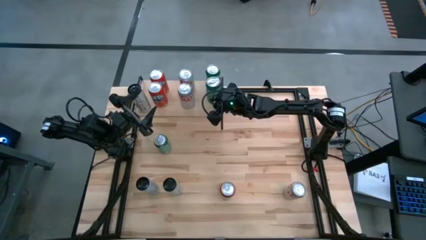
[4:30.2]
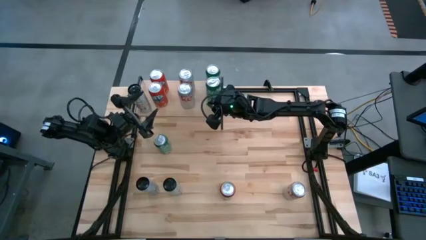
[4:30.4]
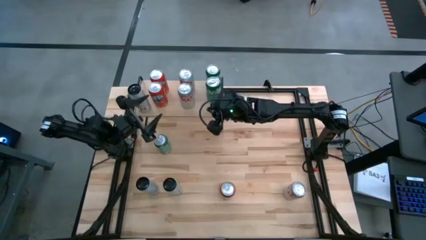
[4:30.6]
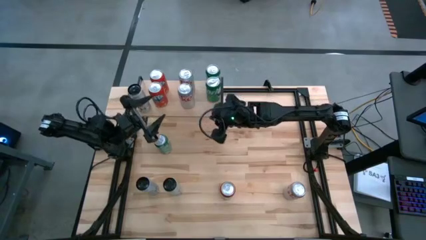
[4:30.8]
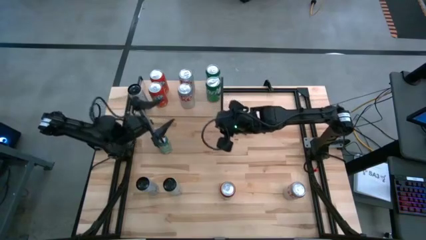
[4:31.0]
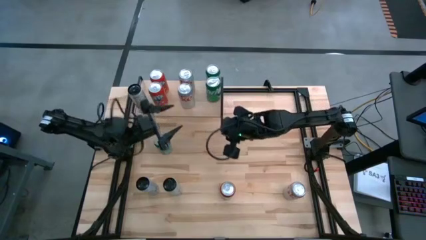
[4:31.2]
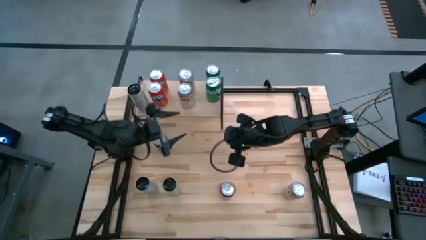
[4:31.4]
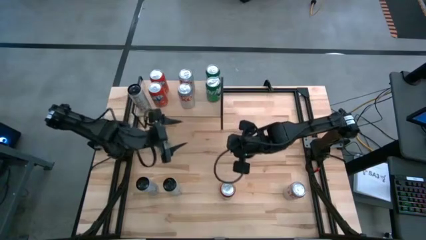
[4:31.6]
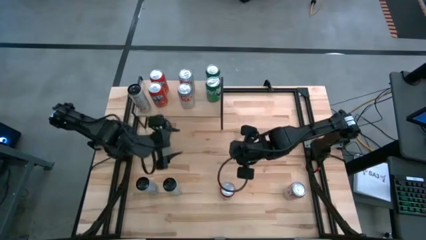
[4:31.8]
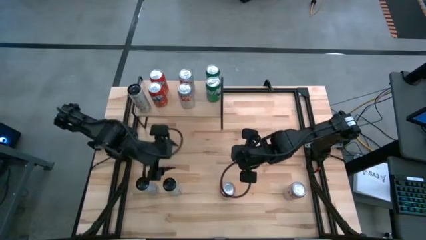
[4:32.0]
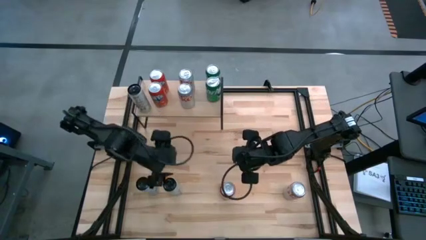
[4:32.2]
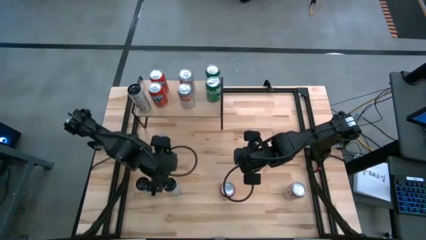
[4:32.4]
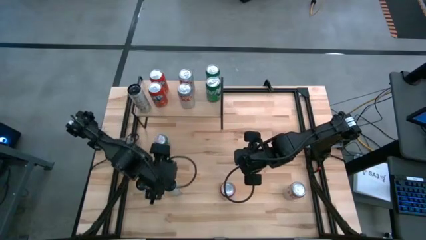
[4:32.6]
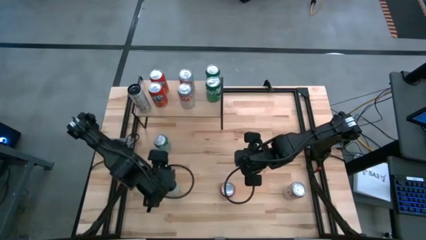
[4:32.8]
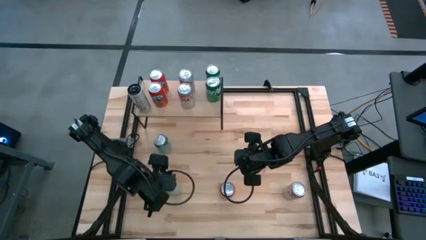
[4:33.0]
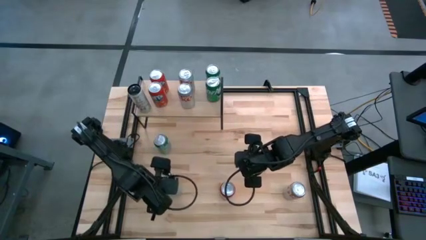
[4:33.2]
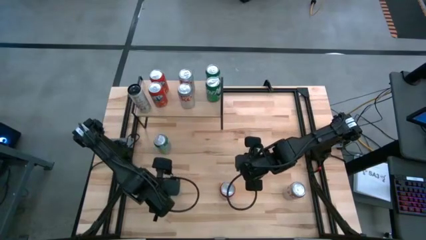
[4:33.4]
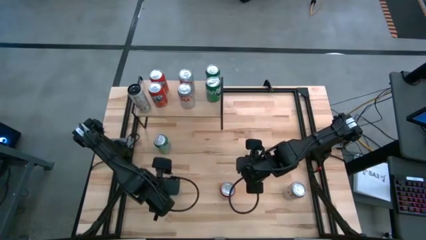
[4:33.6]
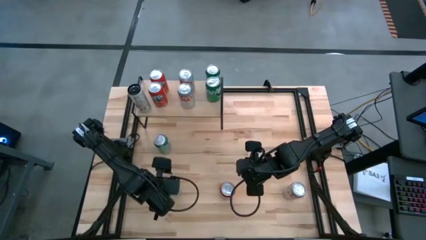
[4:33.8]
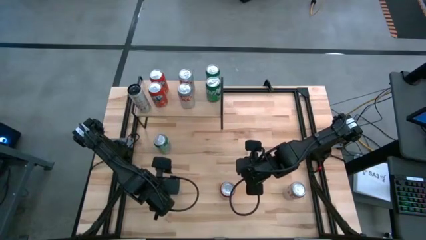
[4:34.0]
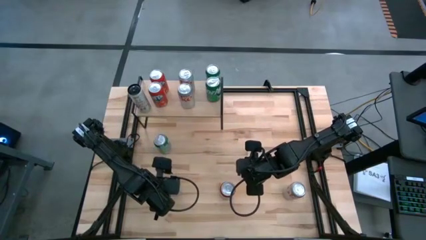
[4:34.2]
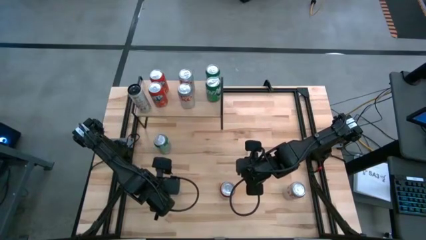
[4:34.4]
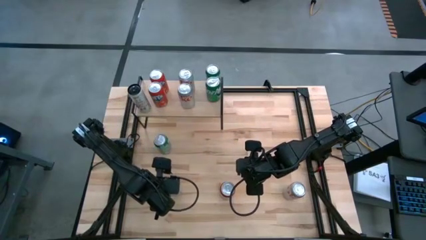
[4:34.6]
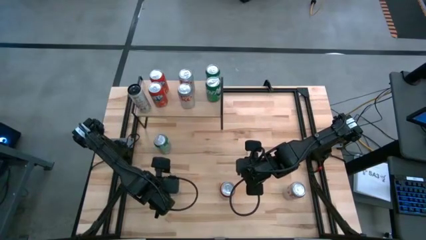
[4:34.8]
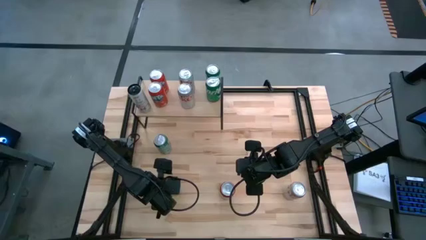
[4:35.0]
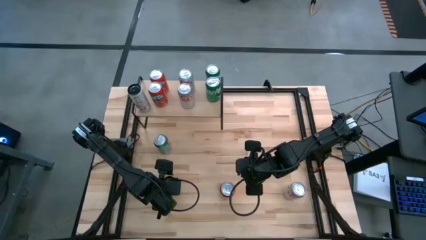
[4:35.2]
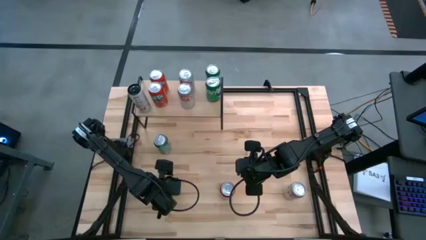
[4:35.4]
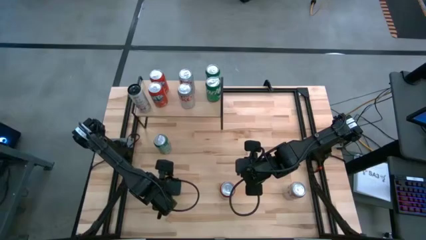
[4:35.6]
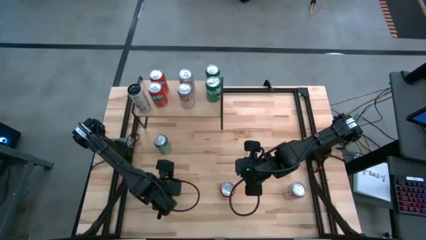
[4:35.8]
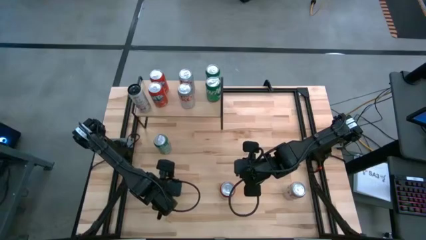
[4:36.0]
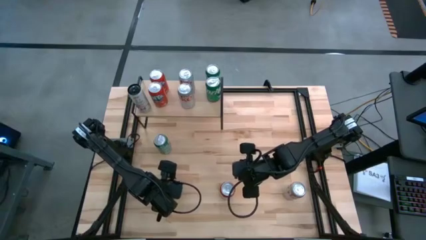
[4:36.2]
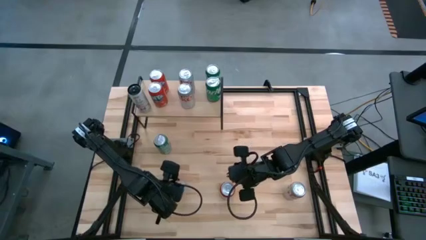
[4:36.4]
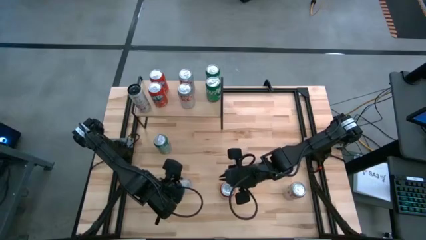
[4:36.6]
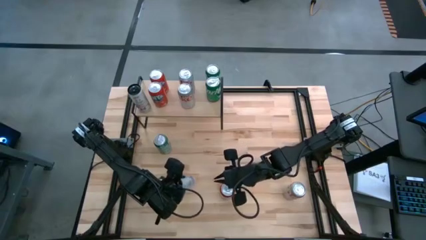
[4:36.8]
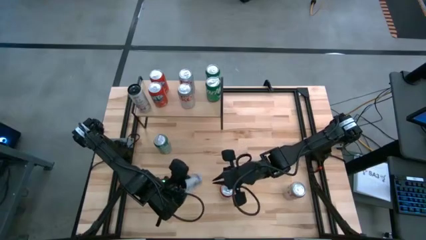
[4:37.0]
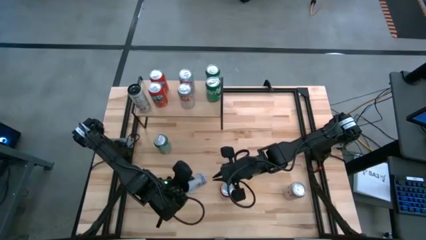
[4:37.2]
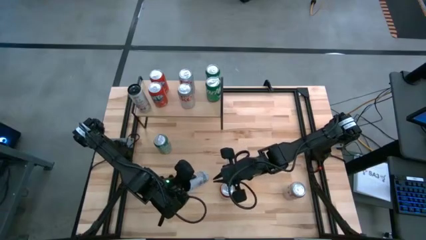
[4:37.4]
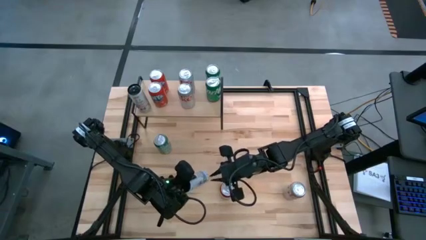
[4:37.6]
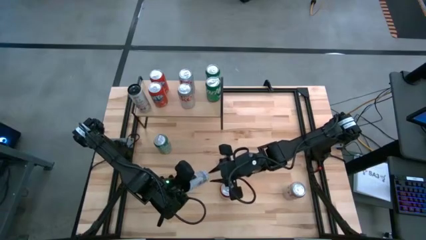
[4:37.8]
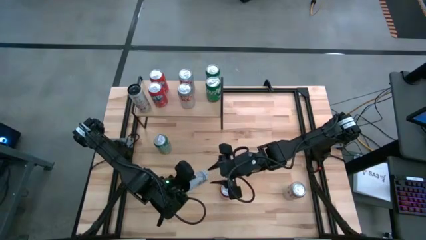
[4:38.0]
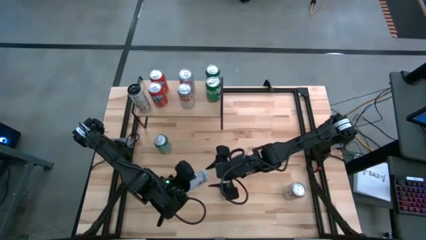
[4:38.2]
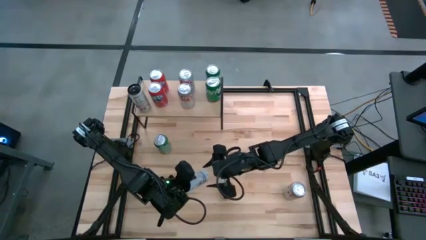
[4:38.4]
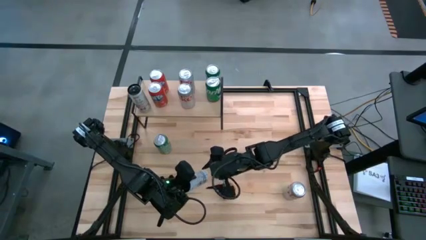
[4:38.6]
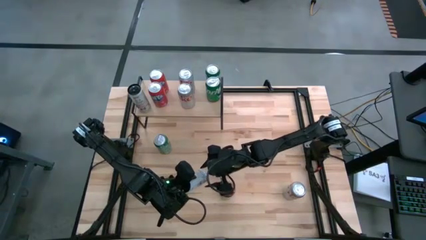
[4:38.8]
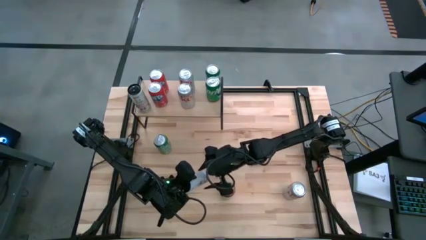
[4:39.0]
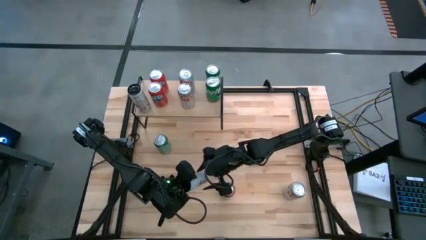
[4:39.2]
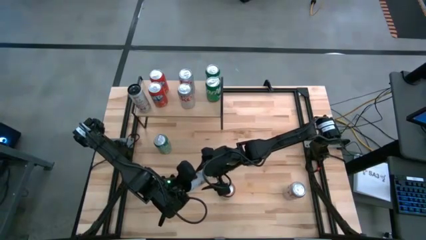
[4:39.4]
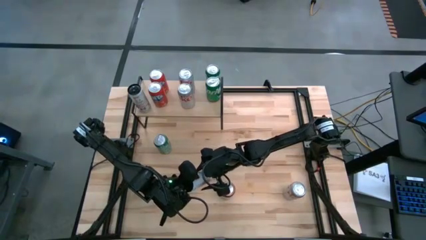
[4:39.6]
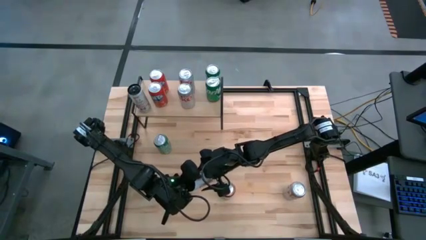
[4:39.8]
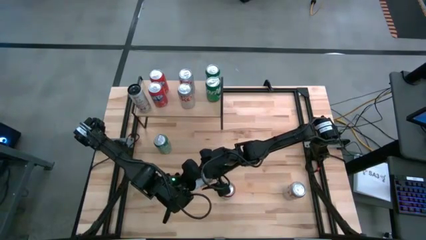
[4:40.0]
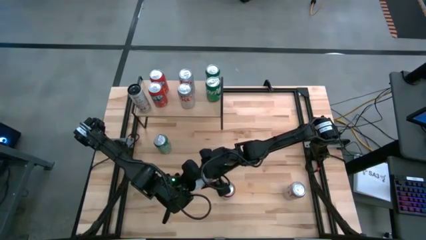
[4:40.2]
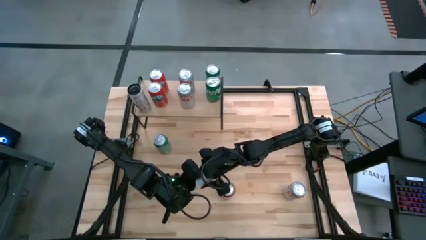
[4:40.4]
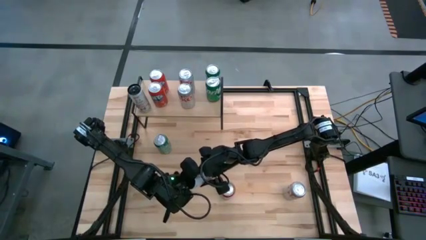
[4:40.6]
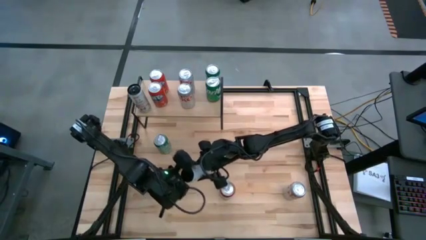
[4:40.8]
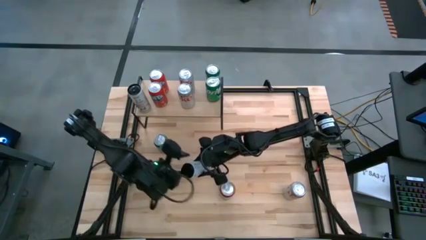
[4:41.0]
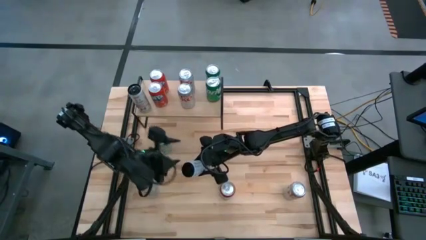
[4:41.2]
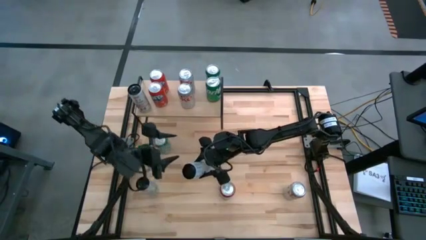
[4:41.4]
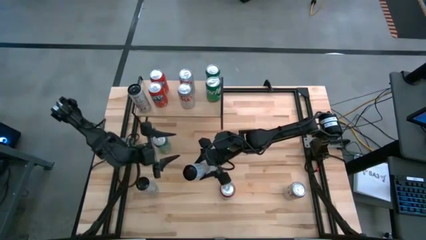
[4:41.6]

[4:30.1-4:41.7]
Task: Place canned beverage on shelf
Put the right white and blue soda can on the shelf
